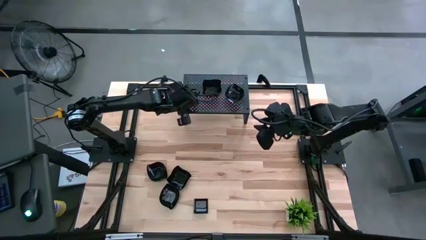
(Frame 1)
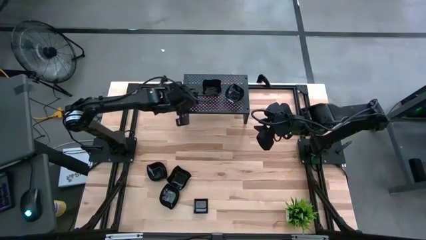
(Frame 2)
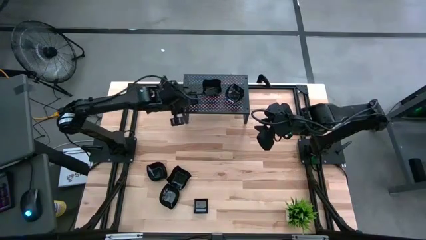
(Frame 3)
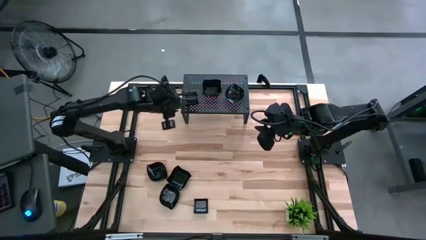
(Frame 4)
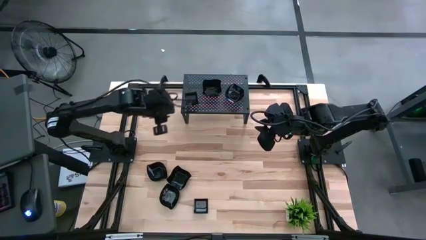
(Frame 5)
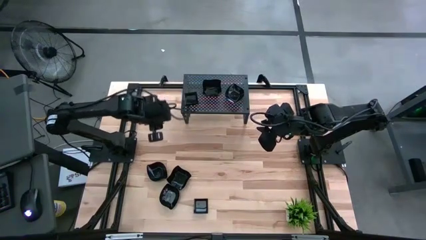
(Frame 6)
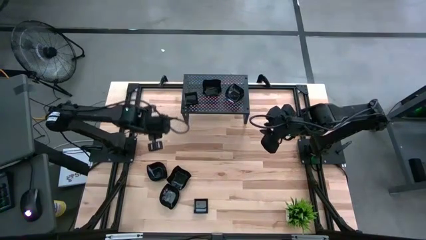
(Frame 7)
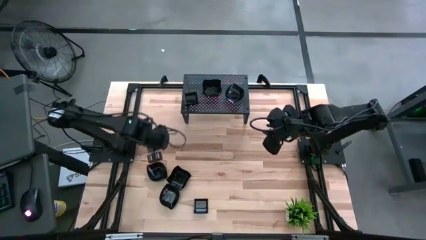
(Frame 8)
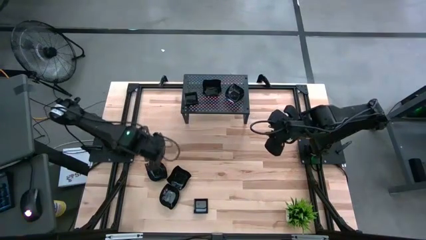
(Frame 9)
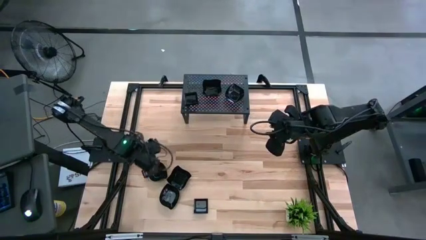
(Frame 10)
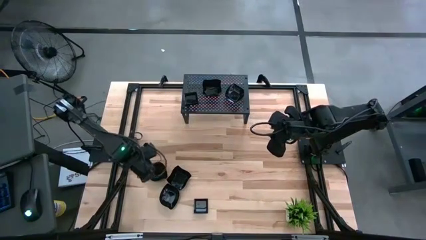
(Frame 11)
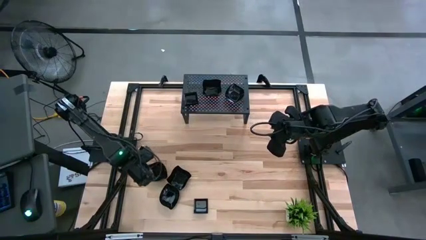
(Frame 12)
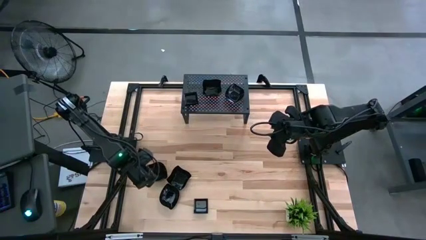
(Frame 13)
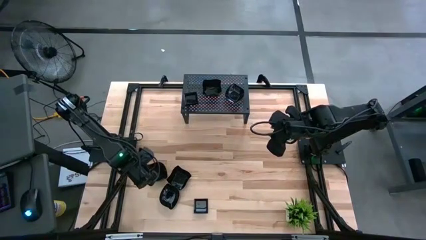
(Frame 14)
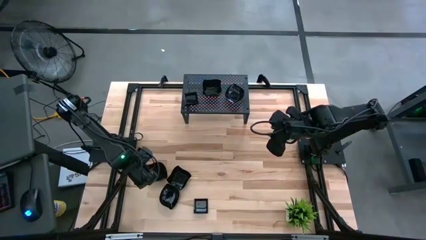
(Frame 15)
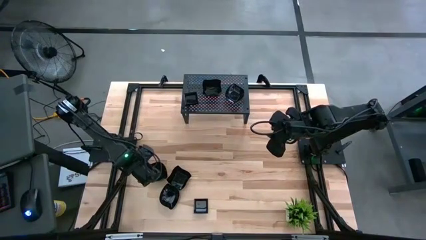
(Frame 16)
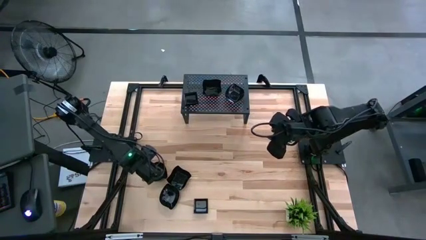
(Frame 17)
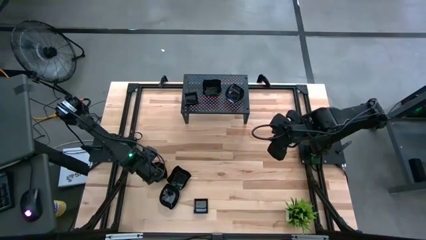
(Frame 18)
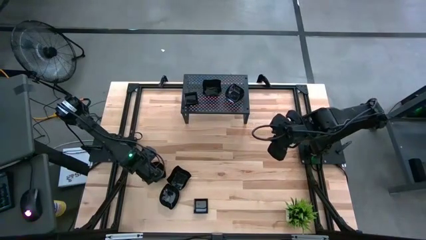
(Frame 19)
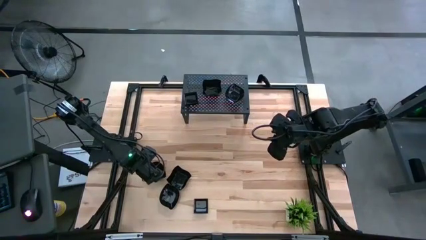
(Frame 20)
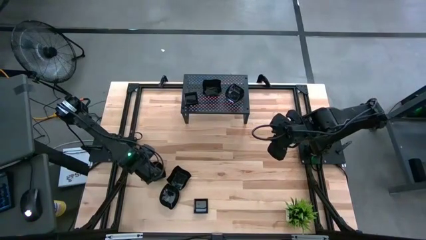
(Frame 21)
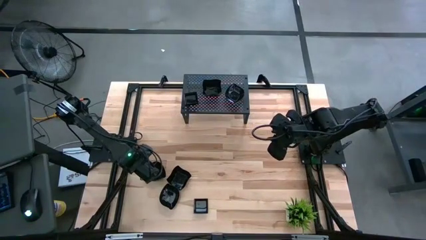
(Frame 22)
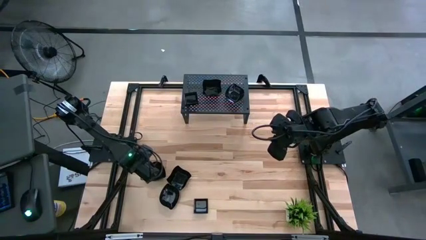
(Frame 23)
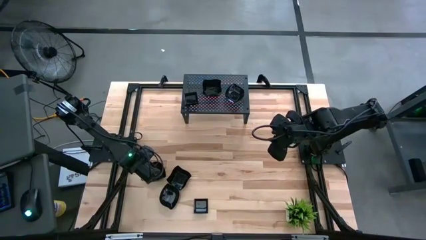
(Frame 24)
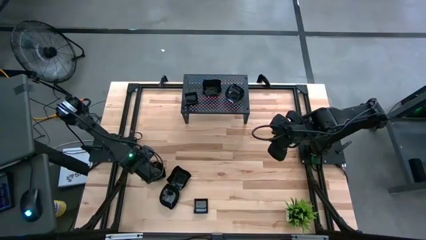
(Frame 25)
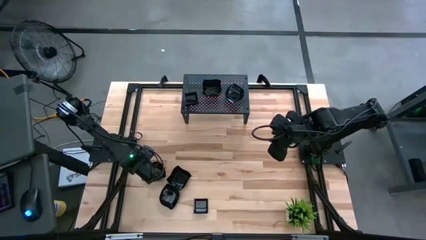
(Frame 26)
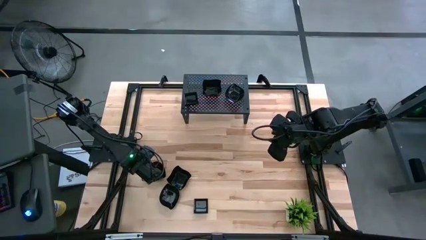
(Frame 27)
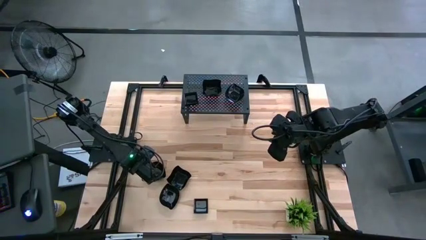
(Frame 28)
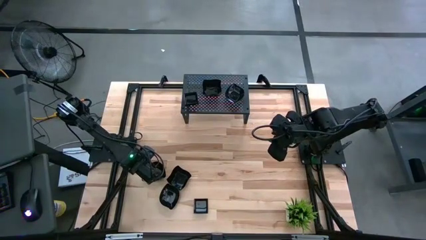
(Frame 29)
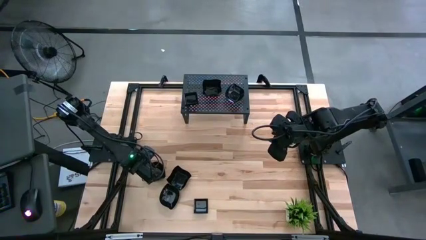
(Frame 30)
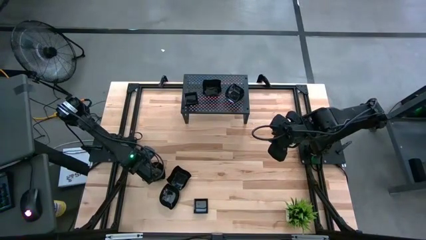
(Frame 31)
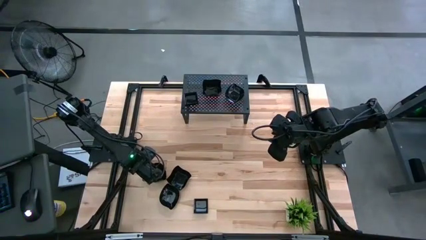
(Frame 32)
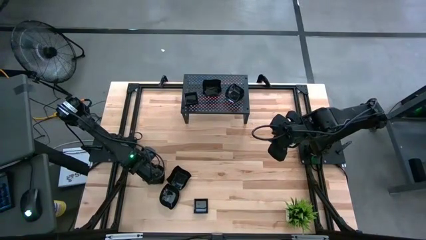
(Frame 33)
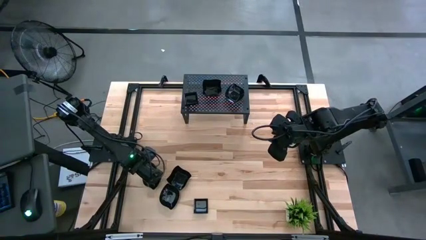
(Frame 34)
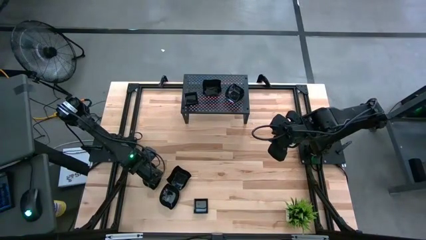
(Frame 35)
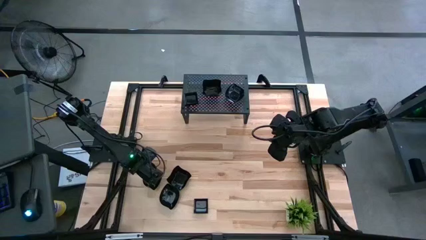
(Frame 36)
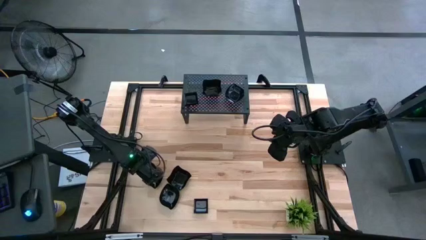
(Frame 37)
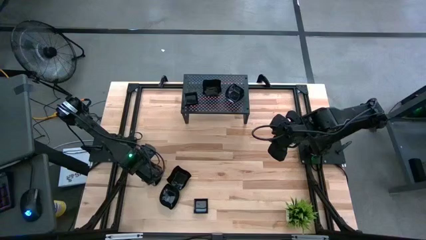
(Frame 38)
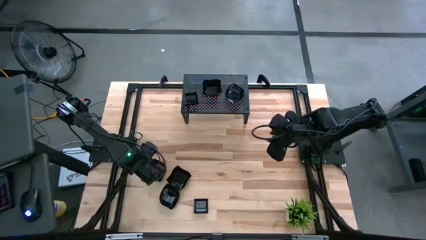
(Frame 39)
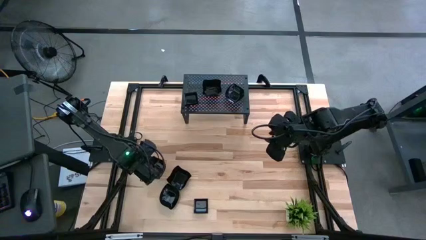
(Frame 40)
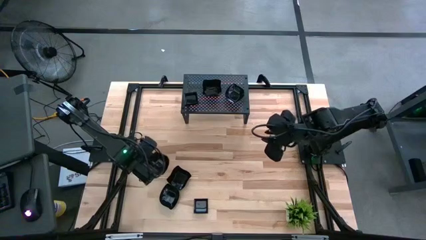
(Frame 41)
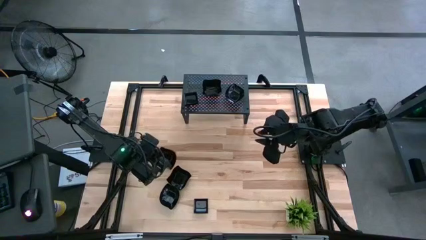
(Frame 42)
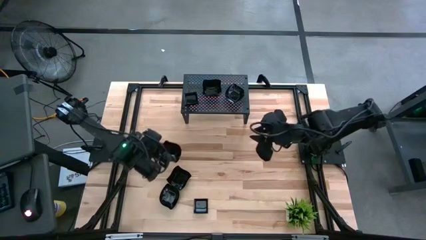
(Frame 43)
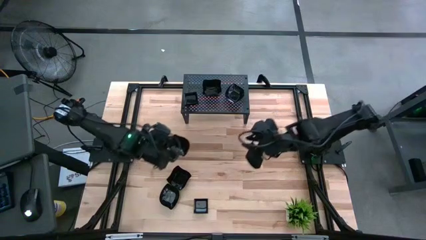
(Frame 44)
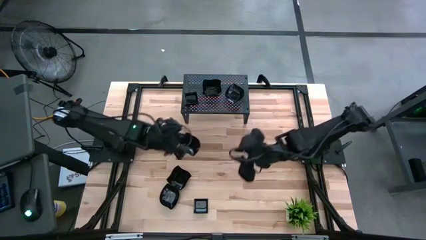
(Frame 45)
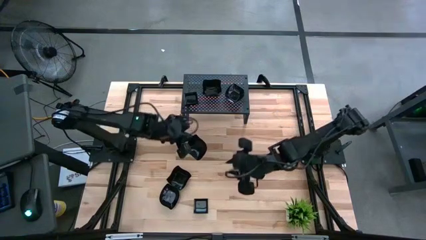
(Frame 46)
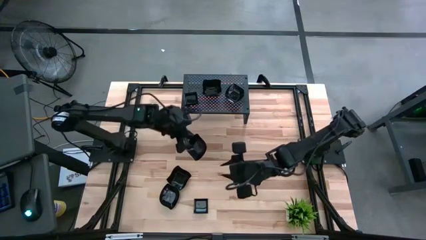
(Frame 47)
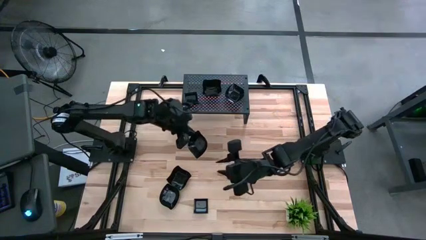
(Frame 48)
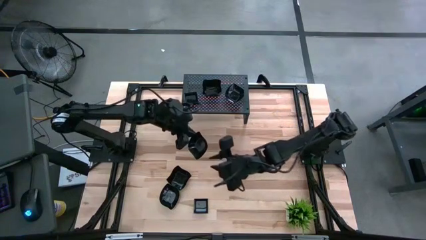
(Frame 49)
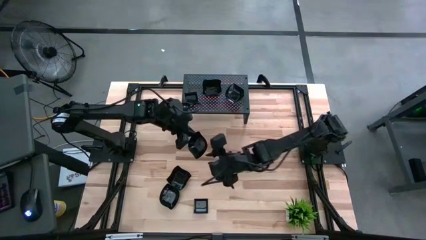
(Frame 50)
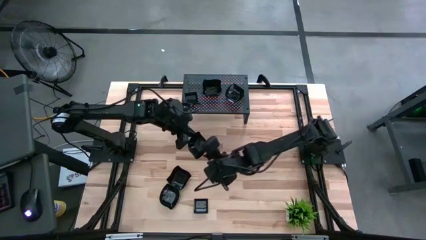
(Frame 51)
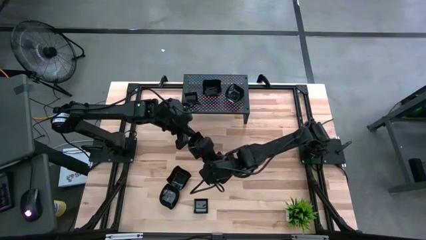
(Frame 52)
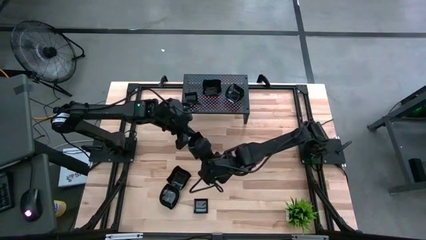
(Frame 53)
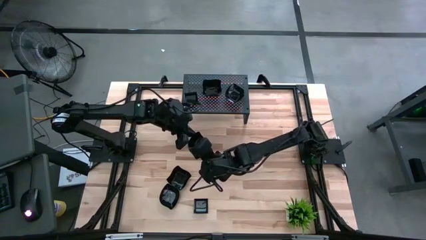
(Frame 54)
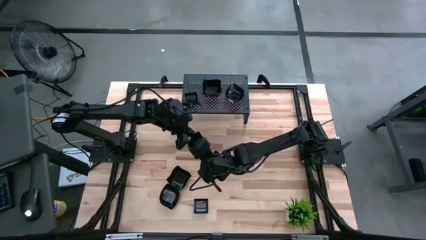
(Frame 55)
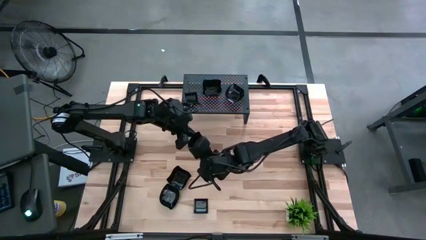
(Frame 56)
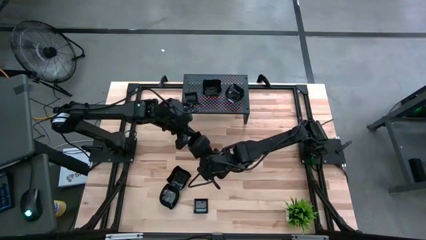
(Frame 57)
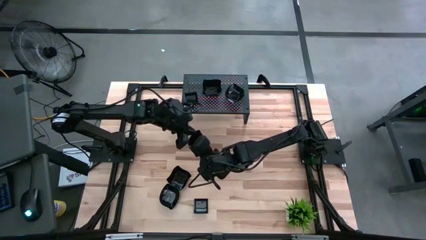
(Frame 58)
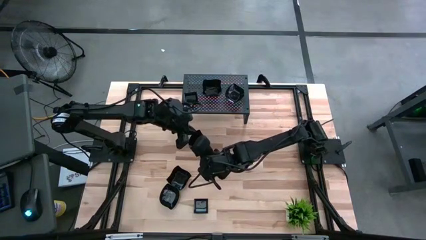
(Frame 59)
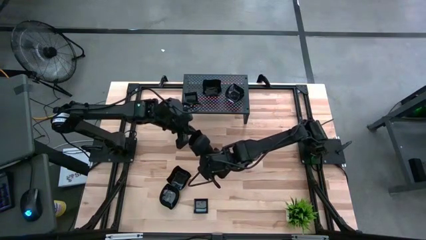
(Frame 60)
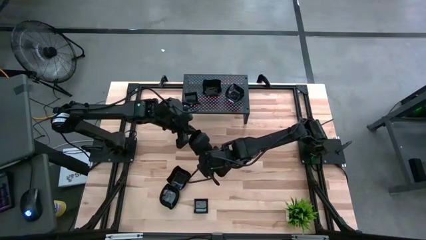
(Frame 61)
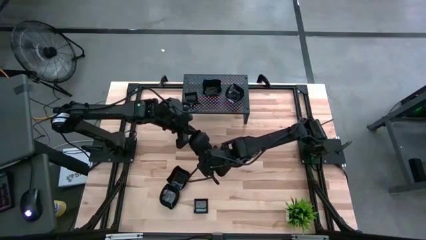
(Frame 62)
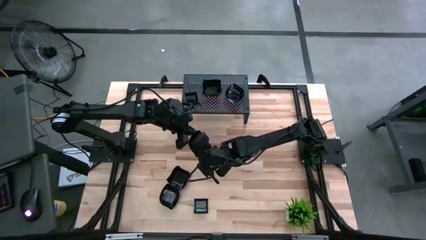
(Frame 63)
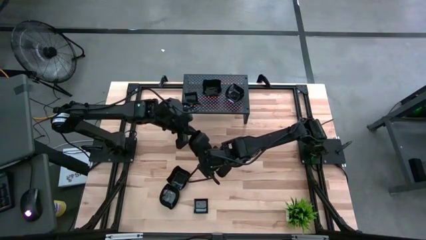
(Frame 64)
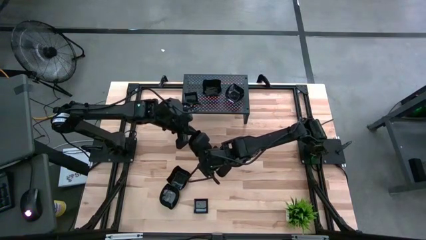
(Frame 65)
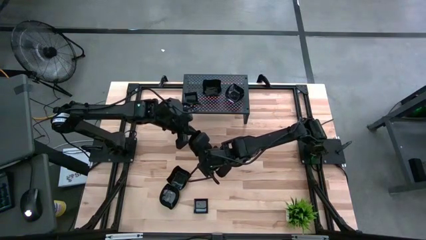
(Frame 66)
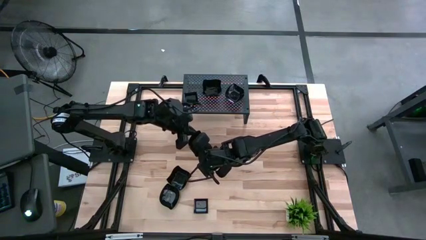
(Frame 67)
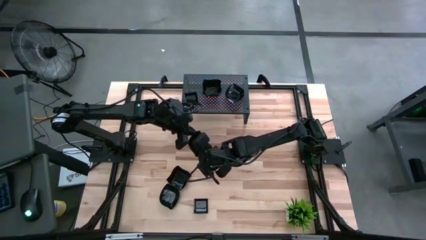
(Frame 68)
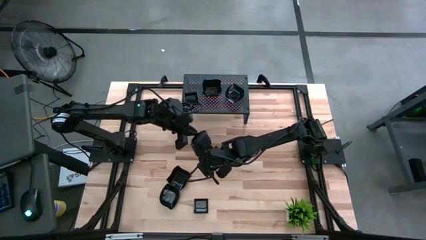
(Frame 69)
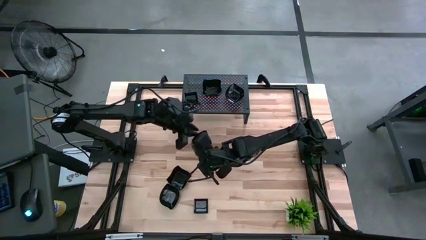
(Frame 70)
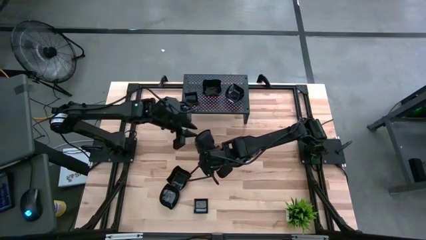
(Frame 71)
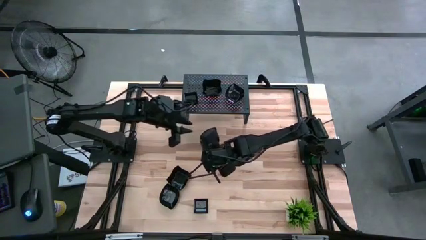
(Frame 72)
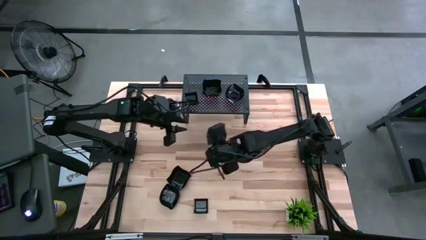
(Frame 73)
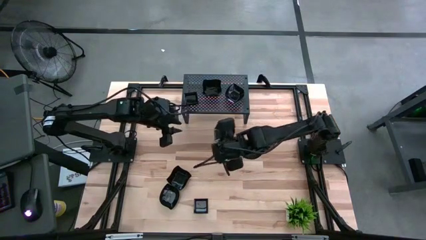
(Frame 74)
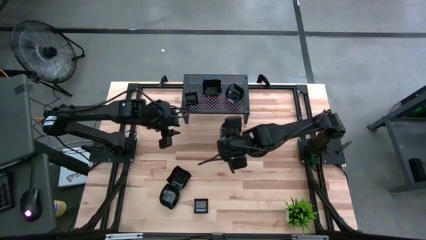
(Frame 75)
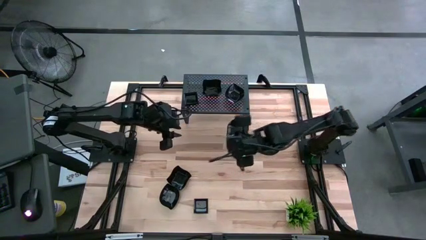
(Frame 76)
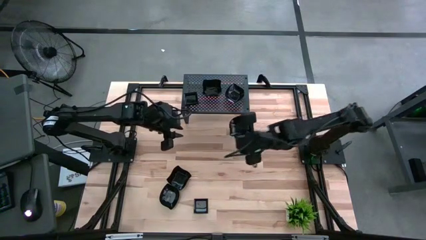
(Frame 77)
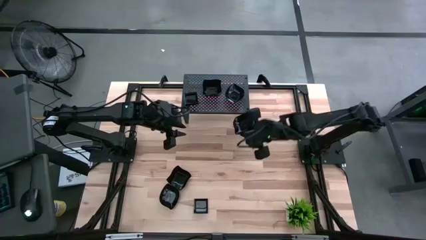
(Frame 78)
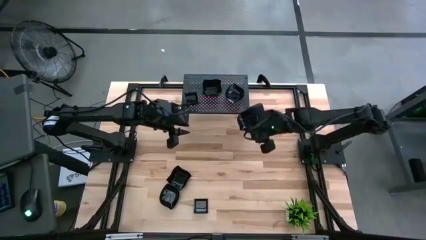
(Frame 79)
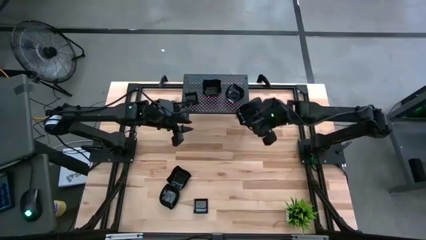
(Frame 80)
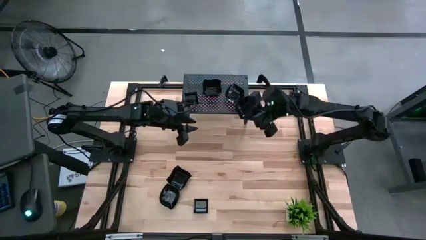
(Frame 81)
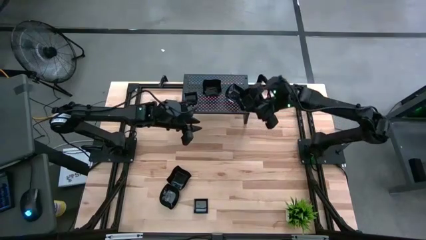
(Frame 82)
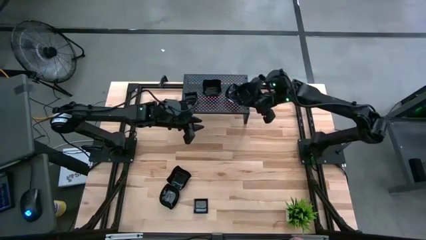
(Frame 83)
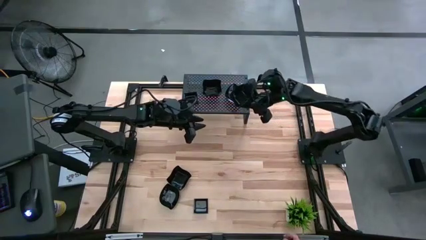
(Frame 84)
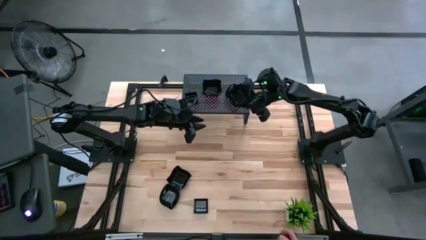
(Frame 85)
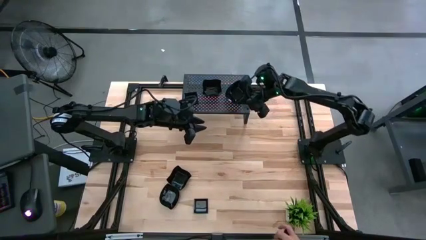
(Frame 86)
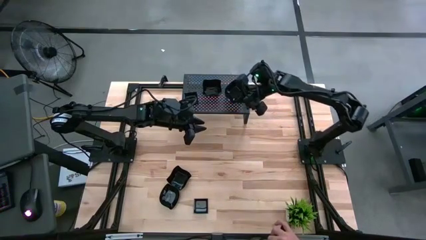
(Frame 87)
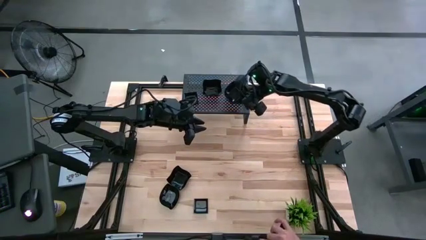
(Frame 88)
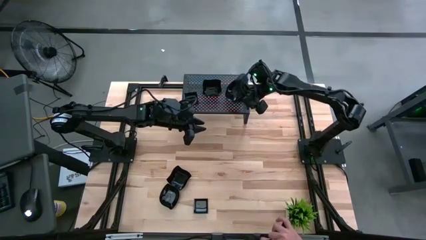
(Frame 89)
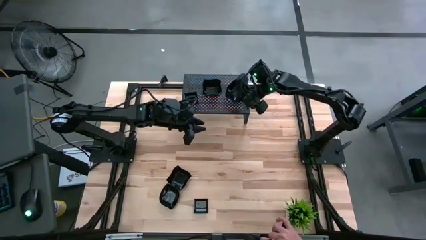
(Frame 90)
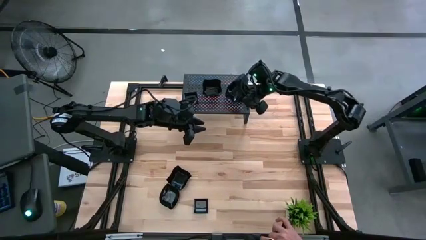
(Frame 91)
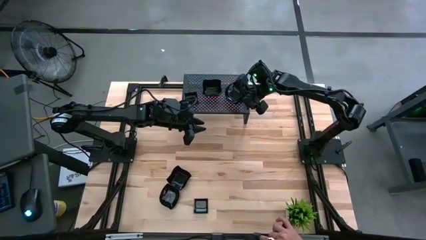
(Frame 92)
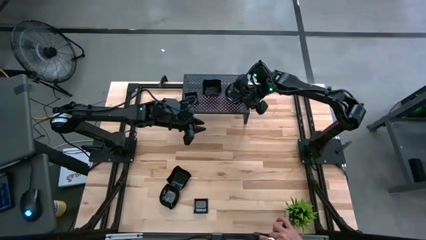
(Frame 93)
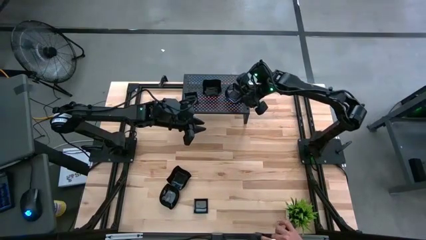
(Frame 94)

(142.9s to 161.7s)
Task: Pick & Place Mini shaped plates
Stack the leaf-shaped plate on top of the leaf-shaped plate on the shelf
